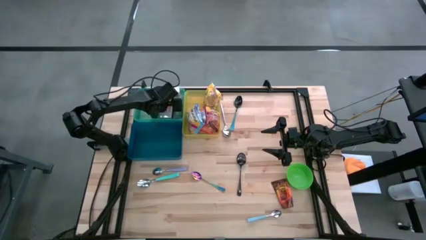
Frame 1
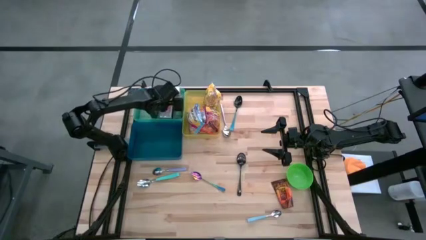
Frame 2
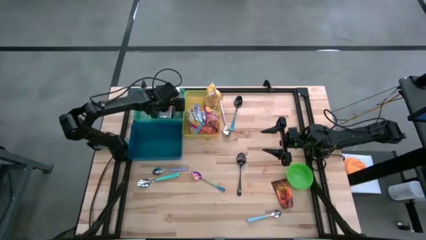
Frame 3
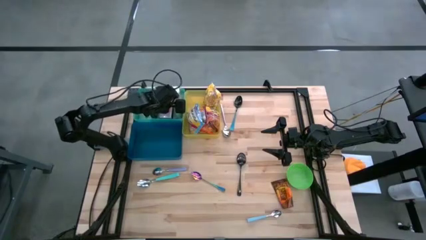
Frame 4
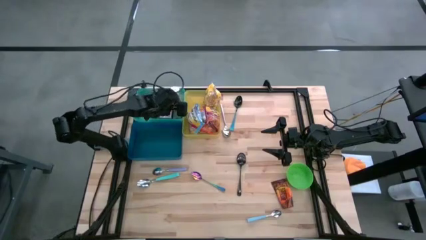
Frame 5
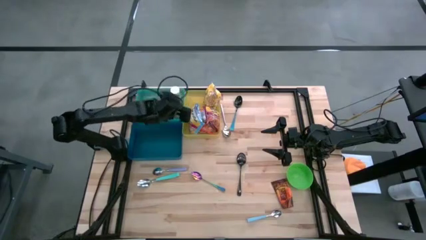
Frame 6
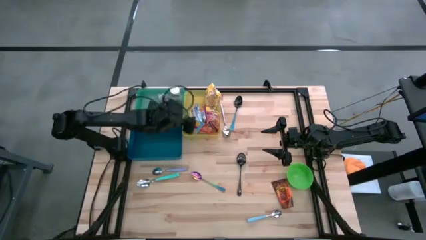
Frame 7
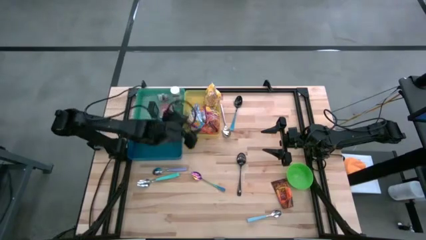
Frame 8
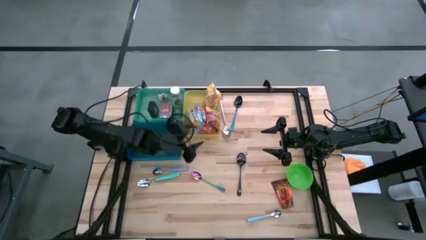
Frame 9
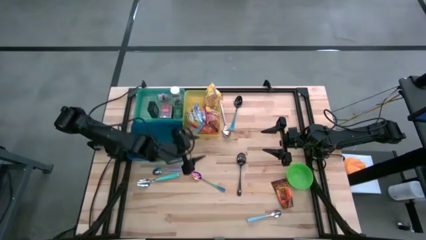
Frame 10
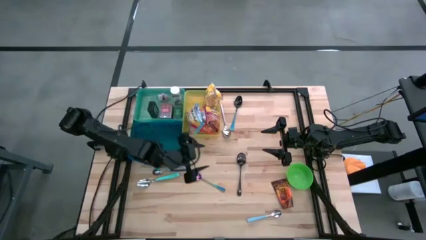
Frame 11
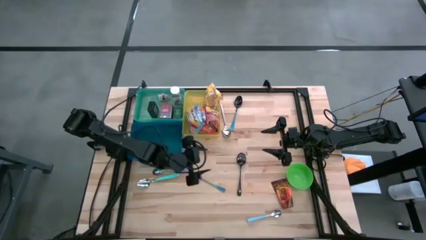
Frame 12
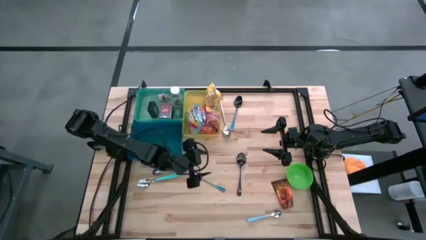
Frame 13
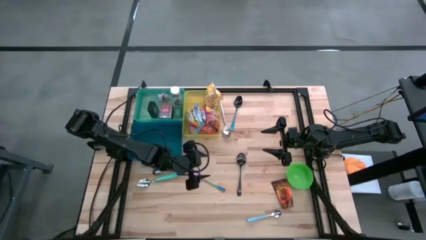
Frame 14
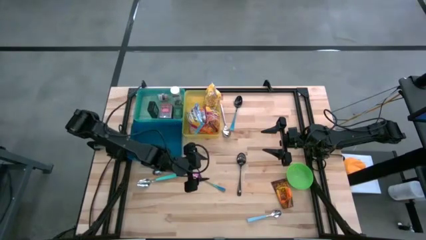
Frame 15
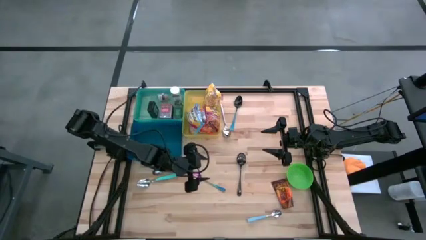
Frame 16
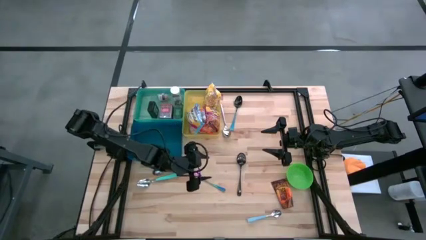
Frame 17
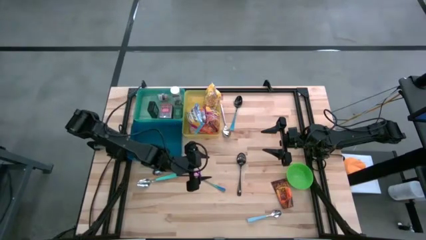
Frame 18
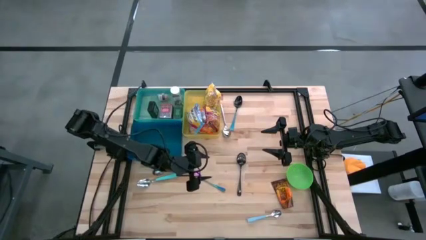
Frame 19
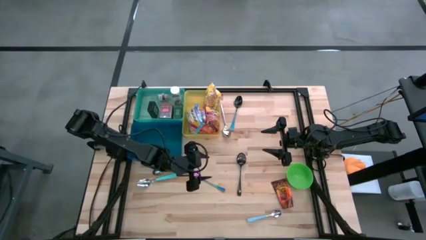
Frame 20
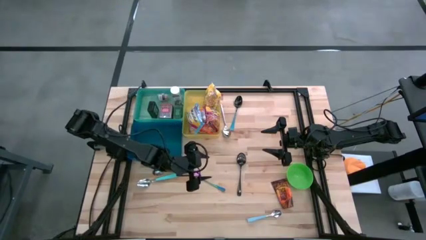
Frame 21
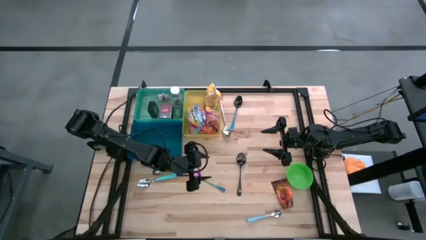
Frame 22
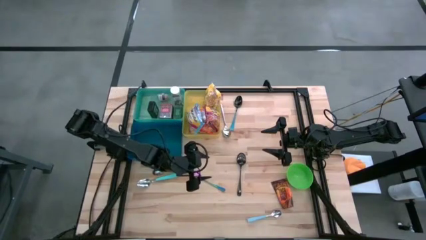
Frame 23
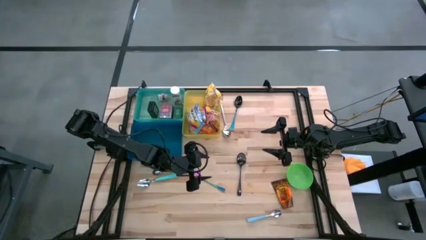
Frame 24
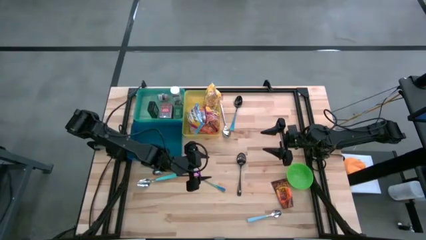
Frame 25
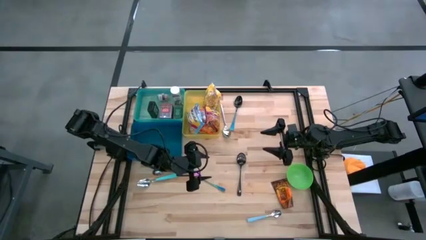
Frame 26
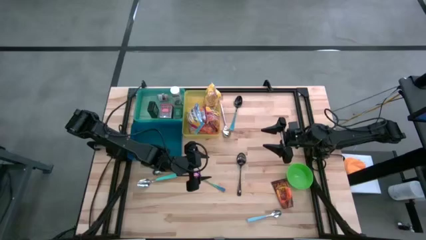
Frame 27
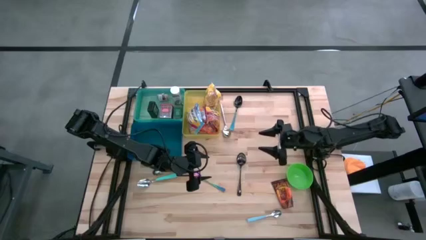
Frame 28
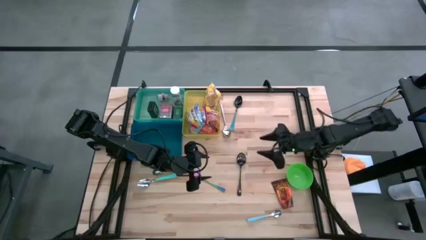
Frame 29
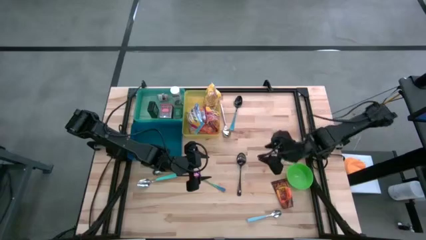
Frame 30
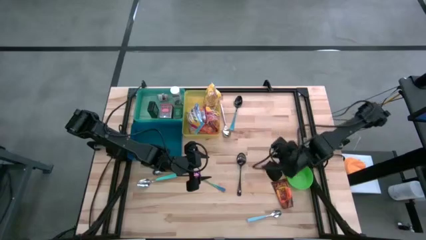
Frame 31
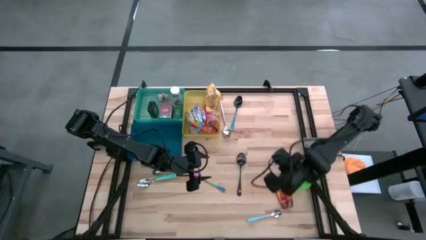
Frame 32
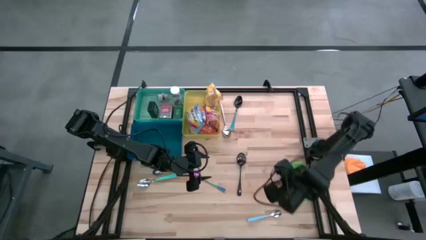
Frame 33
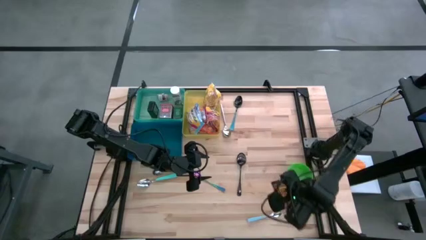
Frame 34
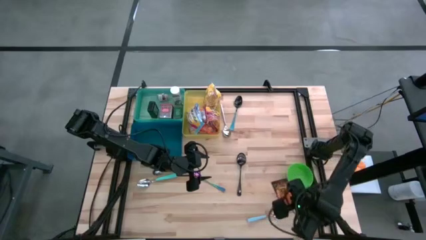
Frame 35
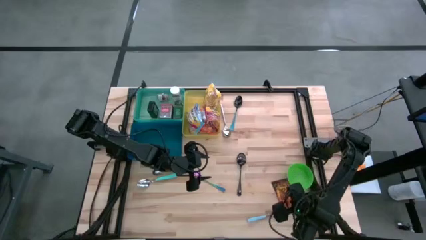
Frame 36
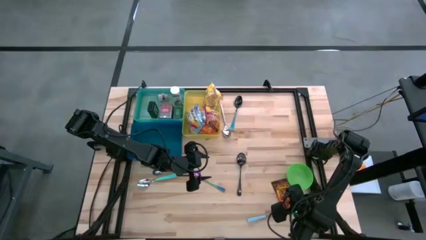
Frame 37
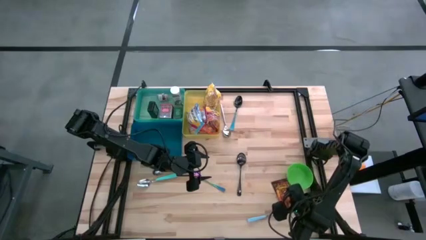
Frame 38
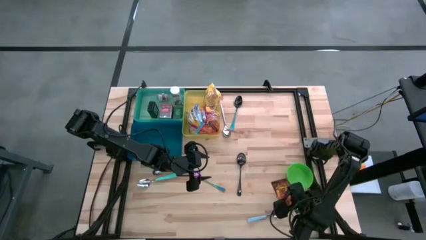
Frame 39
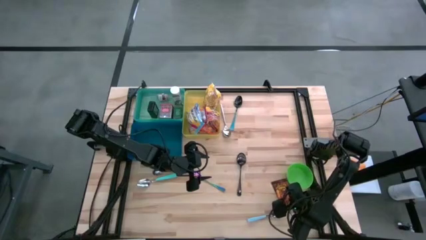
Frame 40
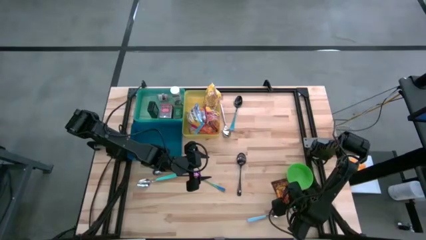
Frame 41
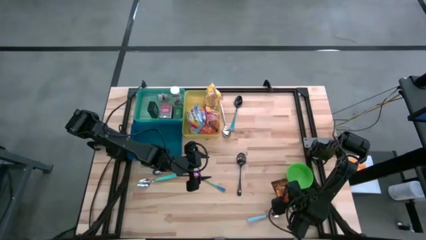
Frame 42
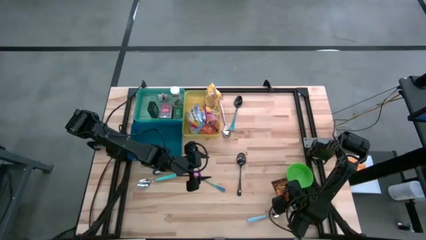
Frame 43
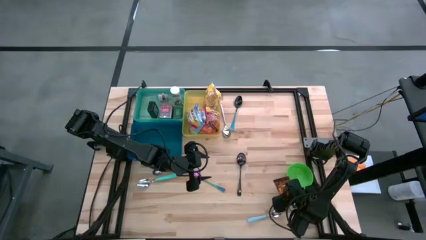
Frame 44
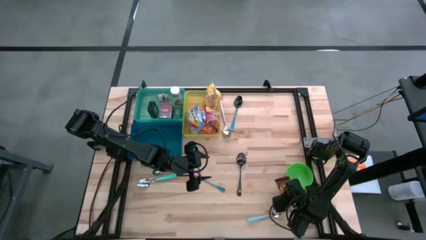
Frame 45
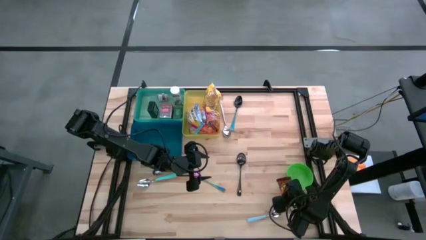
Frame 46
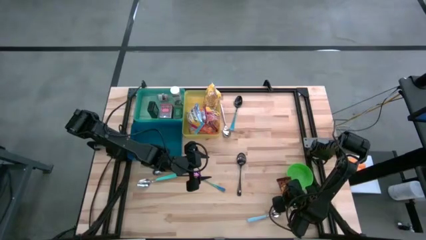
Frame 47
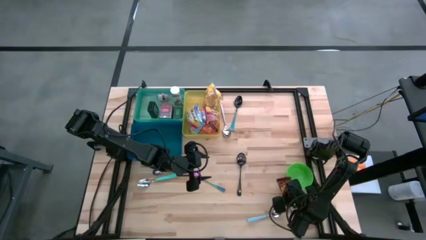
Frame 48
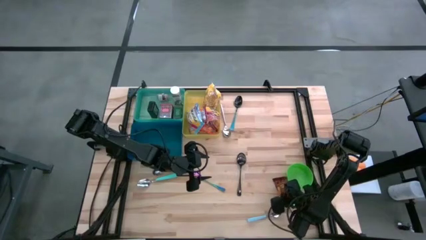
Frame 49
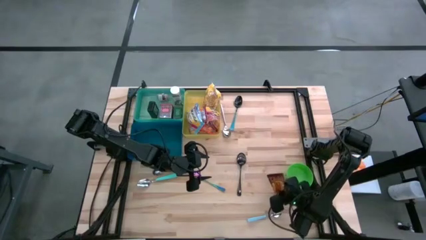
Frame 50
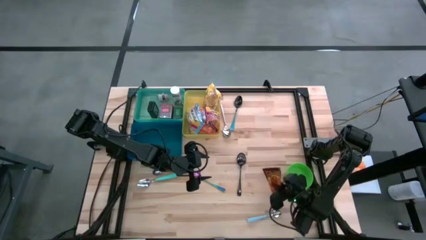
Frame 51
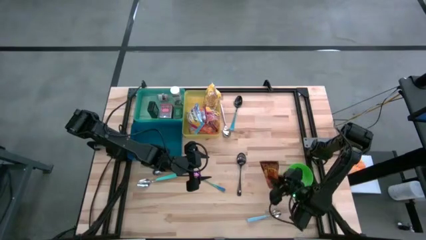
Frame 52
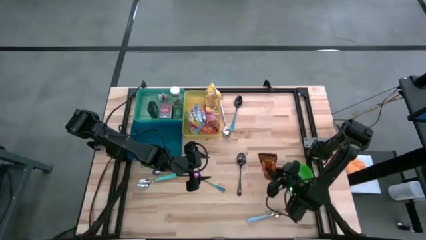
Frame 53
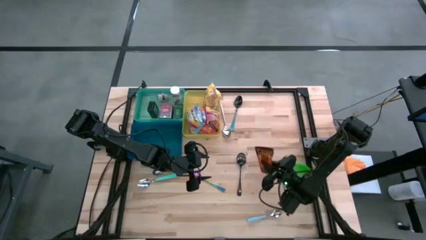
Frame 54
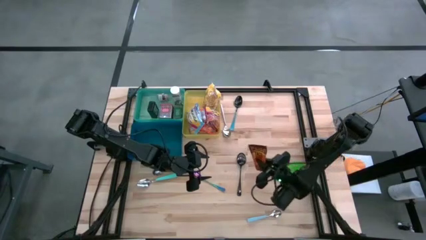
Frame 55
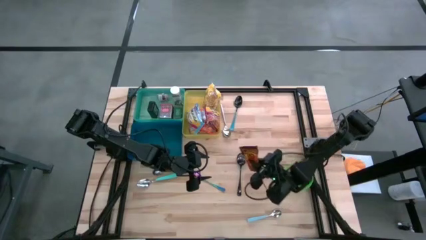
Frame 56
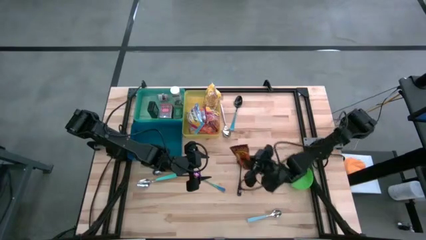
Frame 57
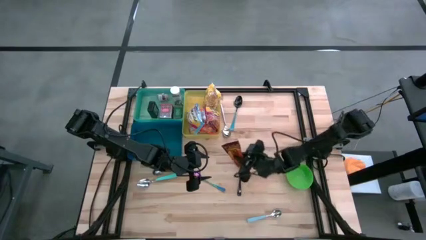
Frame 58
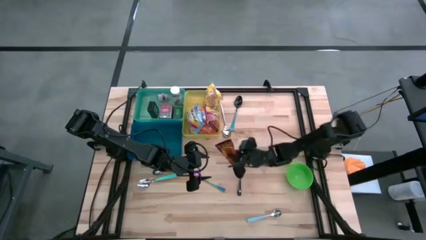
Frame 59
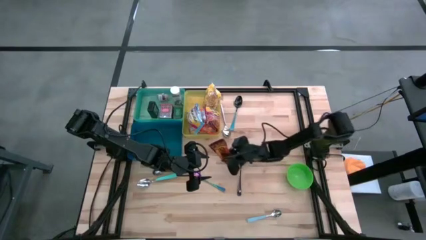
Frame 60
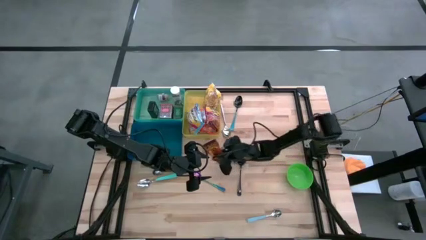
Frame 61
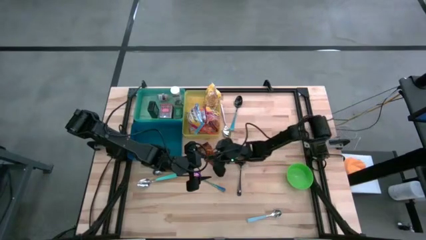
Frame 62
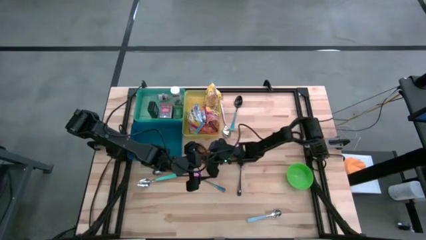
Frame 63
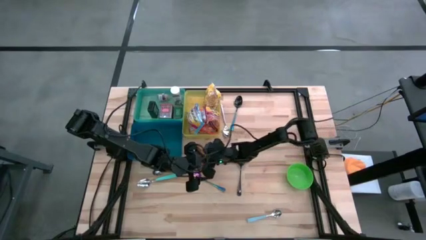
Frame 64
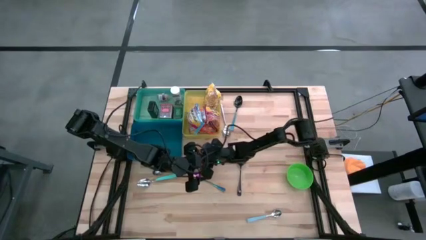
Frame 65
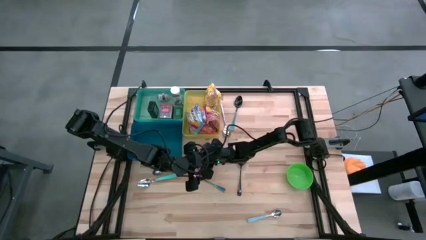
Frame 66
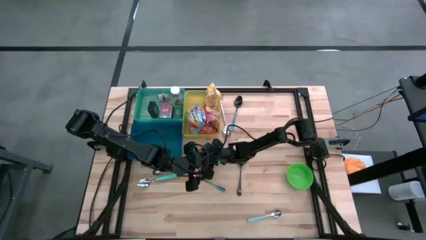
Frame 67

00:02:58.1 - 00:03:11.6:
Put the orange spice pack into the green bin
